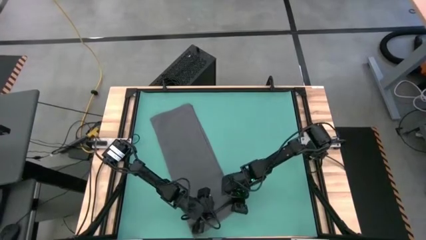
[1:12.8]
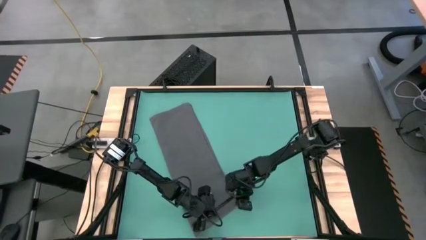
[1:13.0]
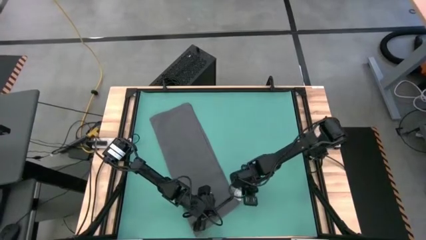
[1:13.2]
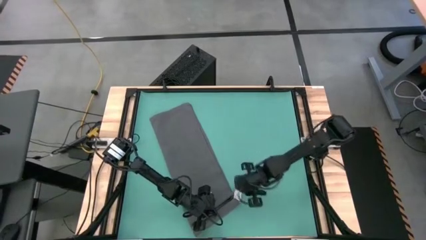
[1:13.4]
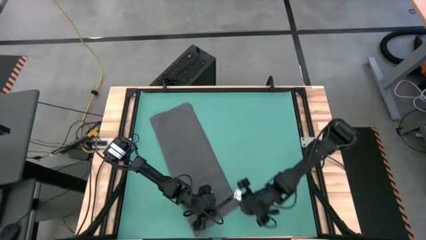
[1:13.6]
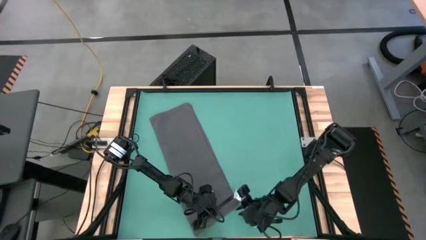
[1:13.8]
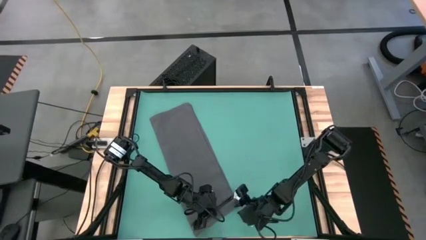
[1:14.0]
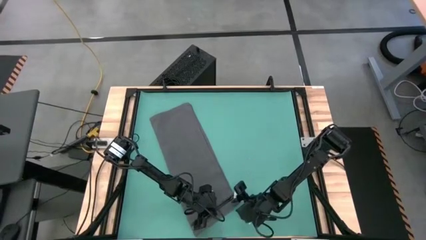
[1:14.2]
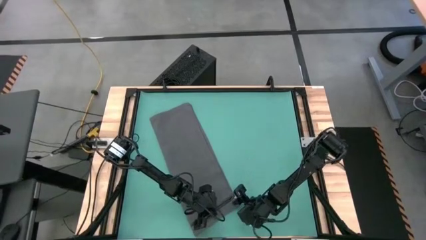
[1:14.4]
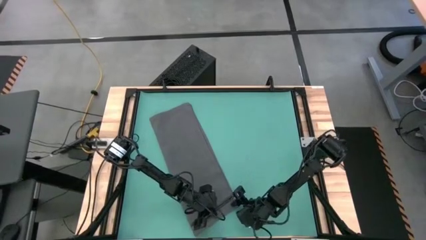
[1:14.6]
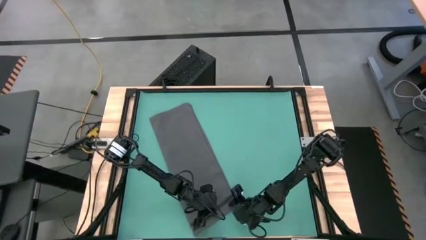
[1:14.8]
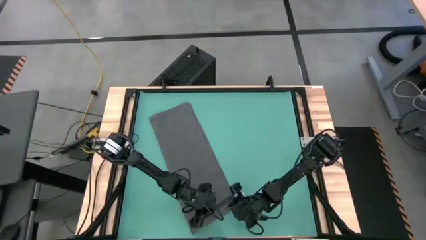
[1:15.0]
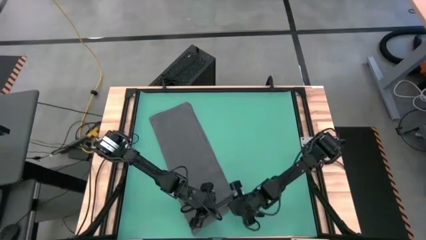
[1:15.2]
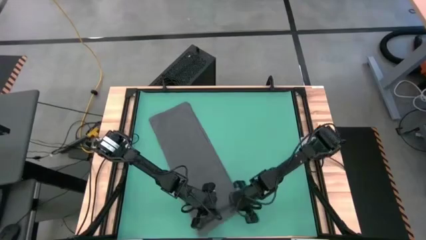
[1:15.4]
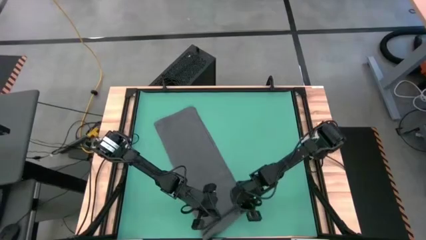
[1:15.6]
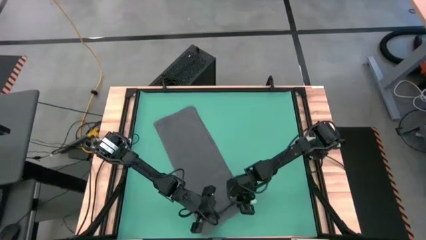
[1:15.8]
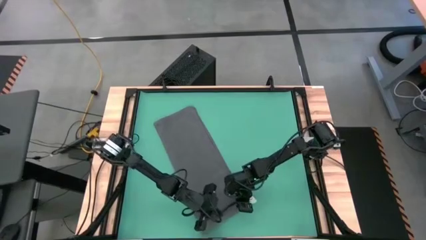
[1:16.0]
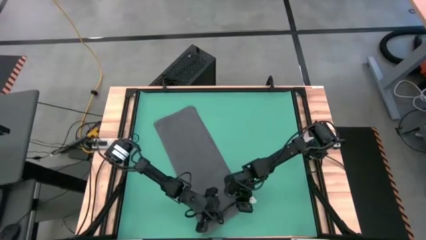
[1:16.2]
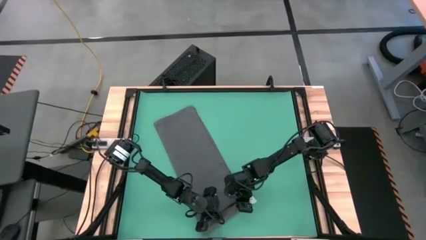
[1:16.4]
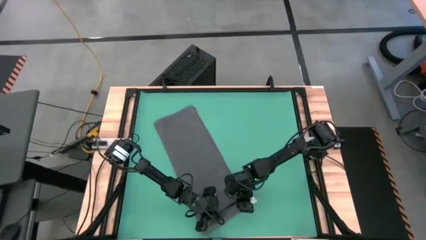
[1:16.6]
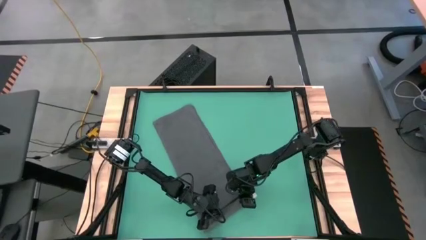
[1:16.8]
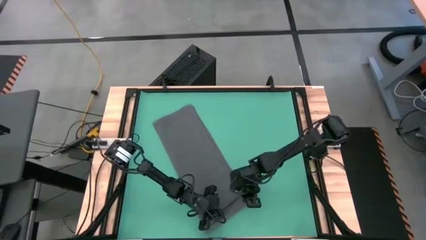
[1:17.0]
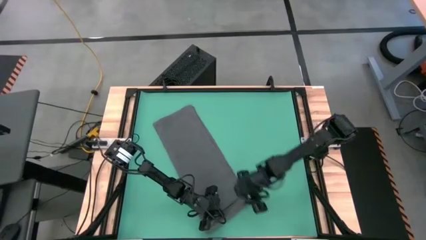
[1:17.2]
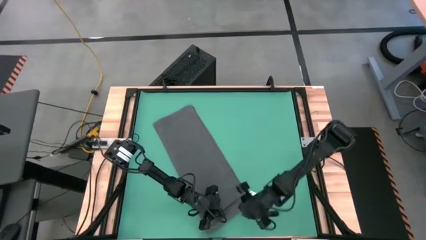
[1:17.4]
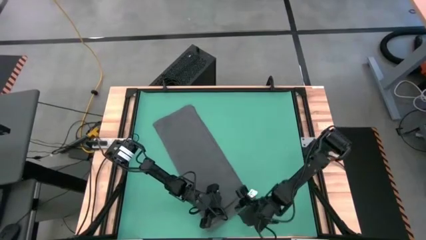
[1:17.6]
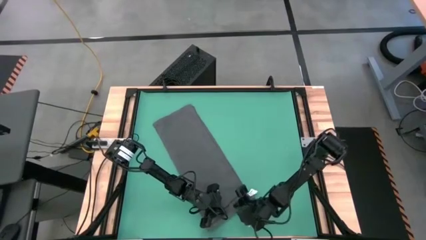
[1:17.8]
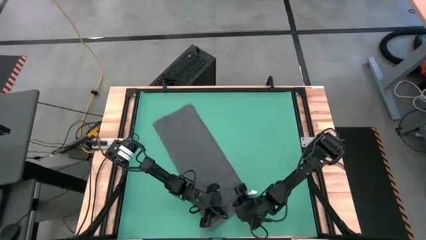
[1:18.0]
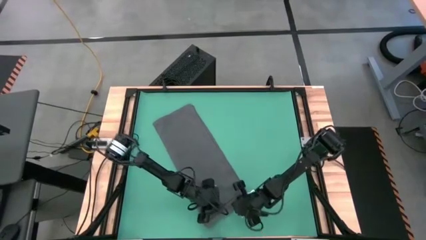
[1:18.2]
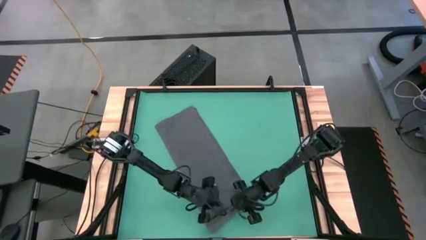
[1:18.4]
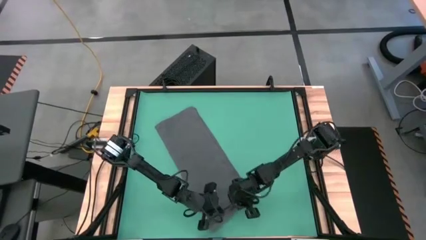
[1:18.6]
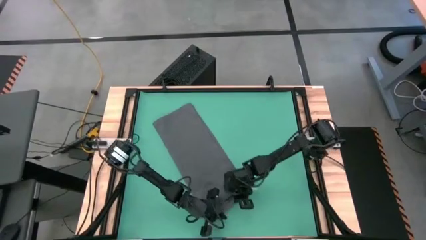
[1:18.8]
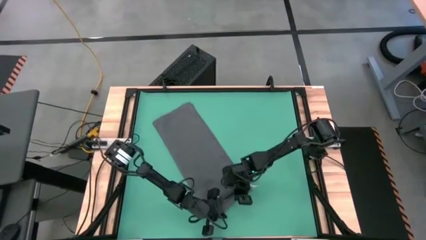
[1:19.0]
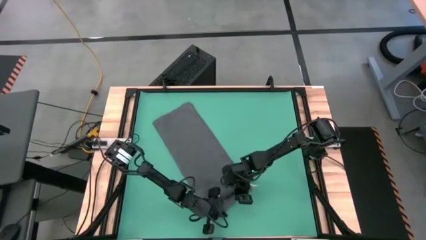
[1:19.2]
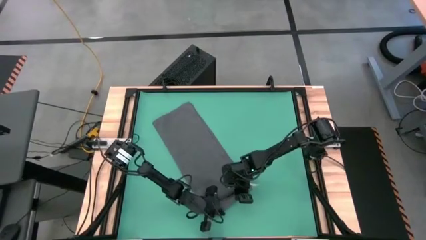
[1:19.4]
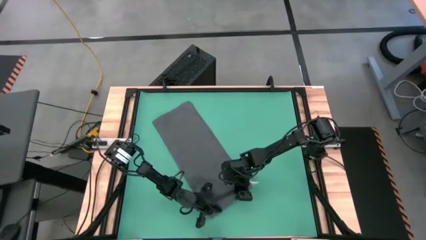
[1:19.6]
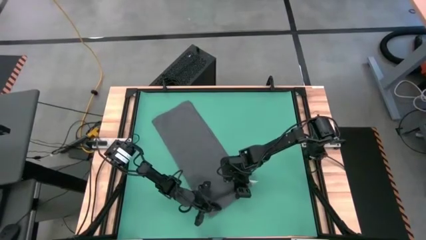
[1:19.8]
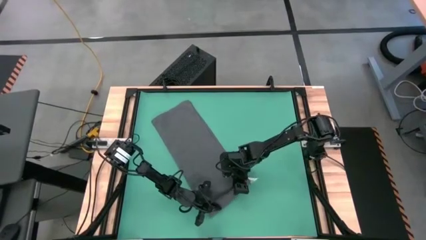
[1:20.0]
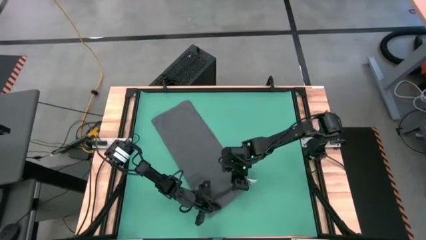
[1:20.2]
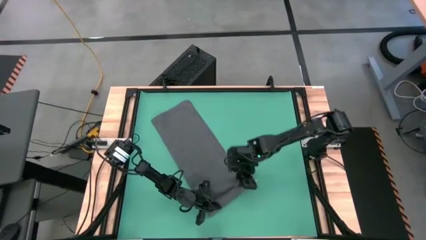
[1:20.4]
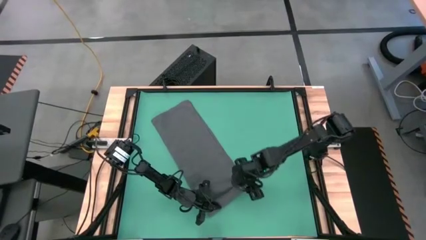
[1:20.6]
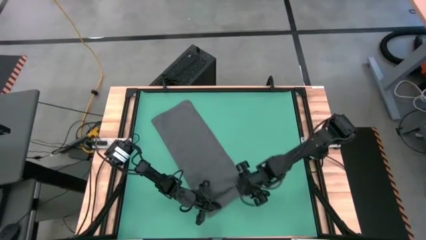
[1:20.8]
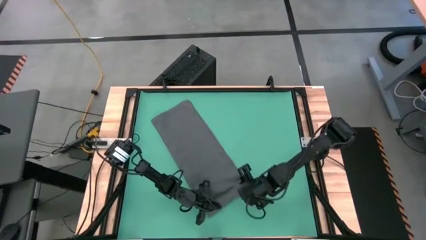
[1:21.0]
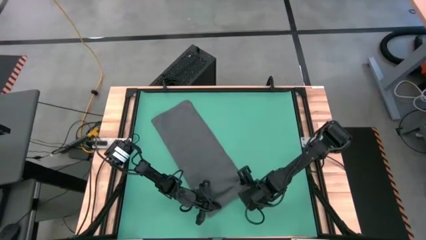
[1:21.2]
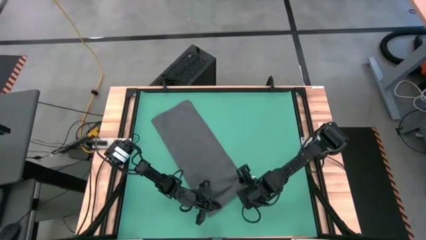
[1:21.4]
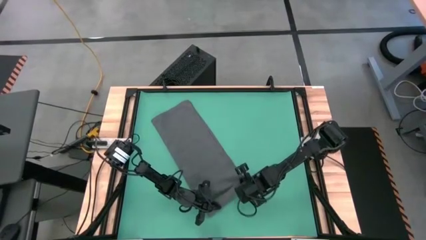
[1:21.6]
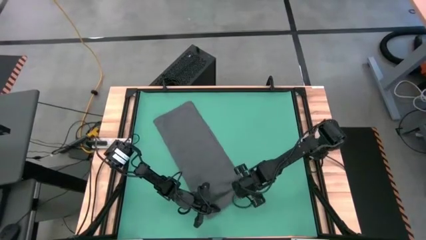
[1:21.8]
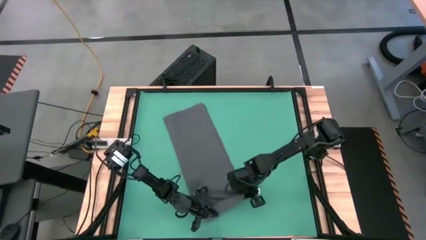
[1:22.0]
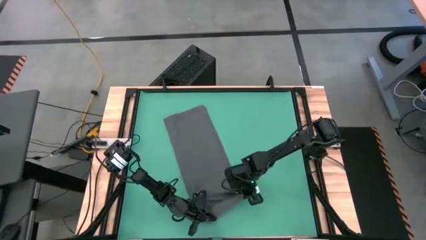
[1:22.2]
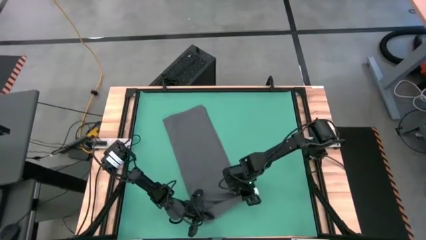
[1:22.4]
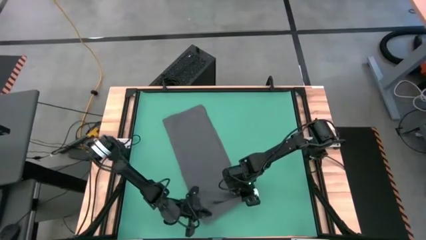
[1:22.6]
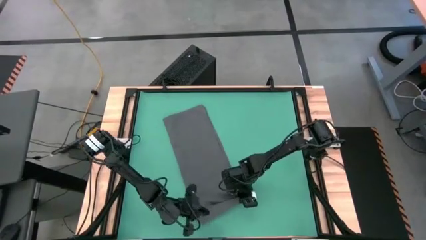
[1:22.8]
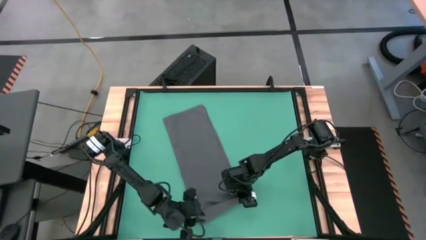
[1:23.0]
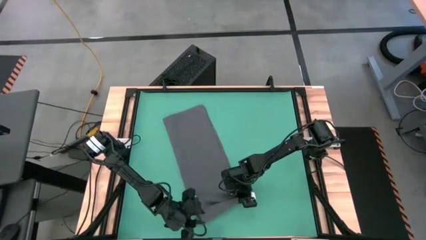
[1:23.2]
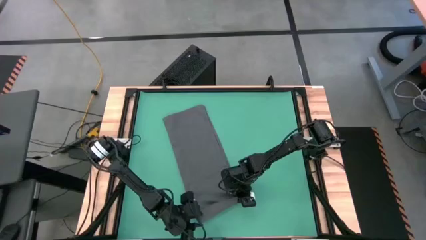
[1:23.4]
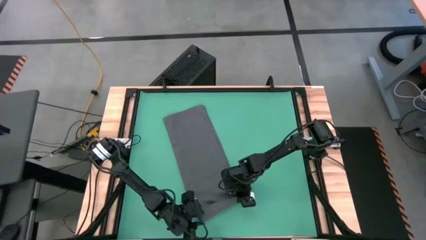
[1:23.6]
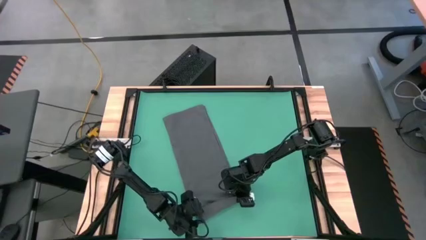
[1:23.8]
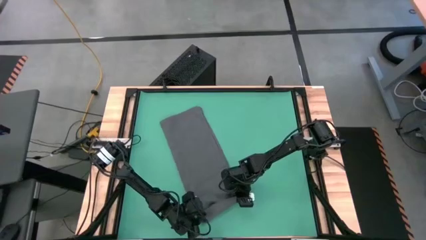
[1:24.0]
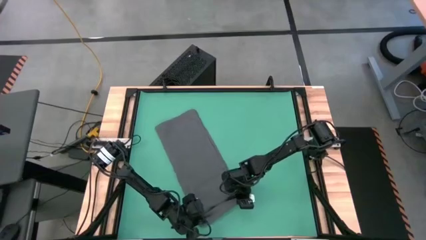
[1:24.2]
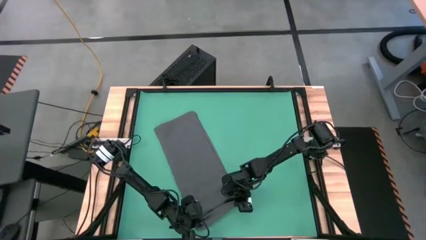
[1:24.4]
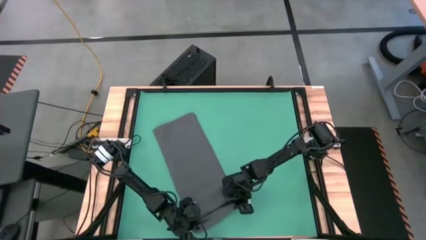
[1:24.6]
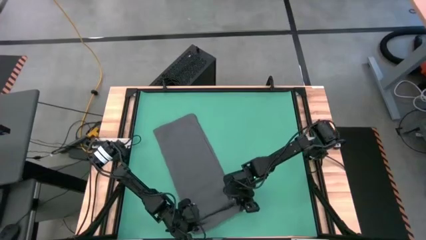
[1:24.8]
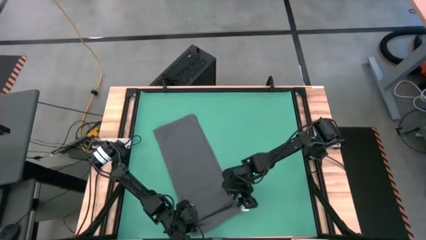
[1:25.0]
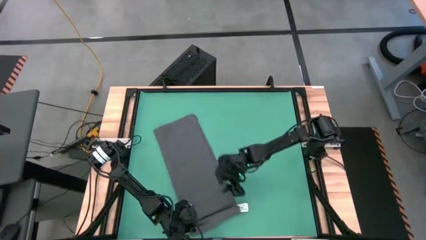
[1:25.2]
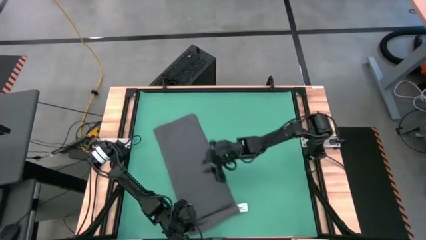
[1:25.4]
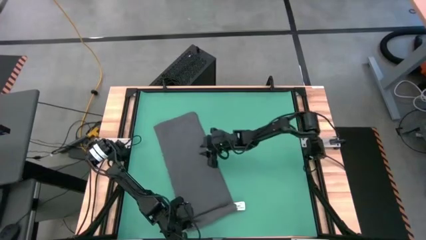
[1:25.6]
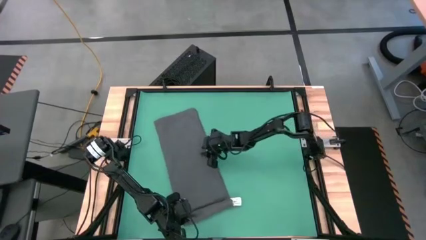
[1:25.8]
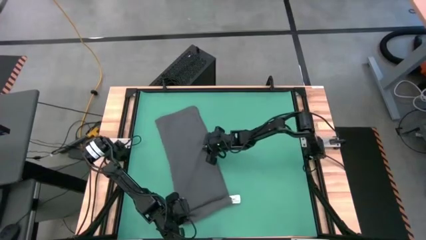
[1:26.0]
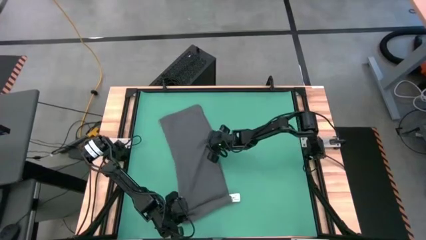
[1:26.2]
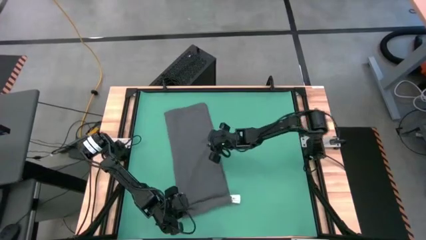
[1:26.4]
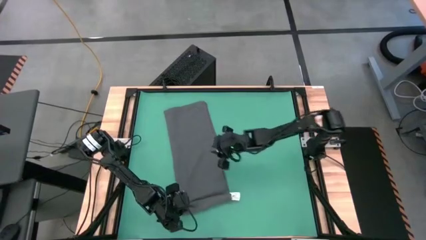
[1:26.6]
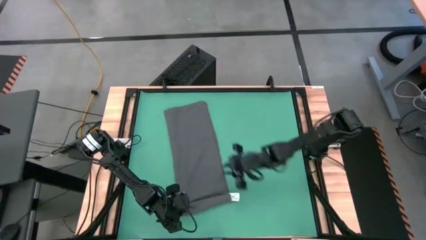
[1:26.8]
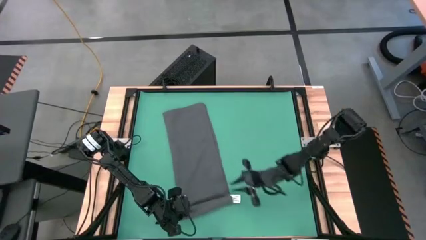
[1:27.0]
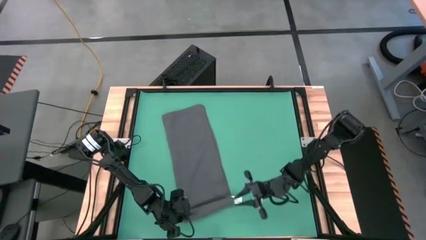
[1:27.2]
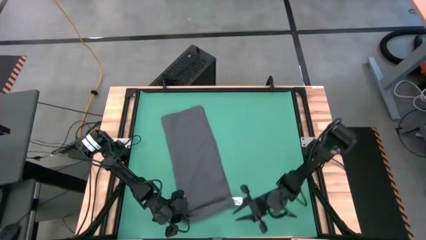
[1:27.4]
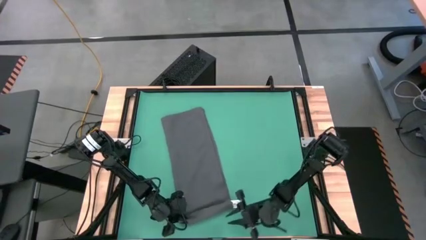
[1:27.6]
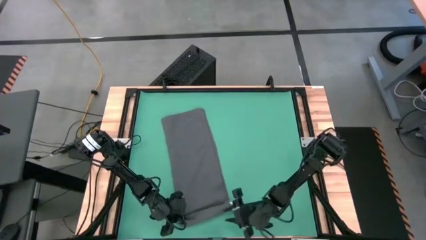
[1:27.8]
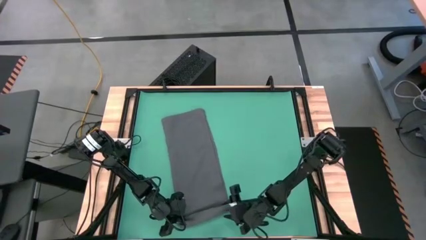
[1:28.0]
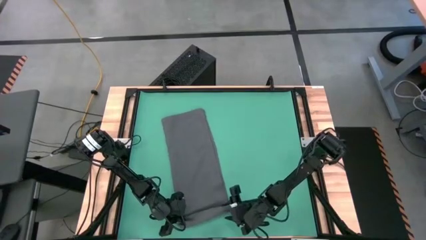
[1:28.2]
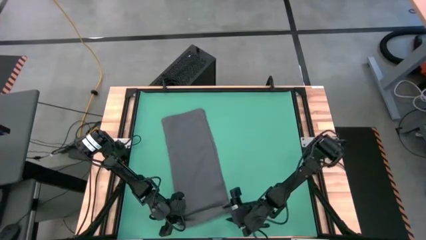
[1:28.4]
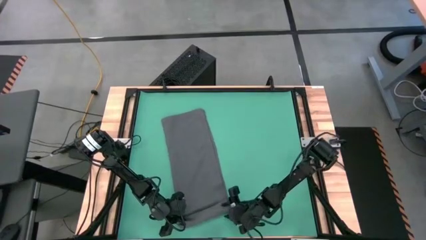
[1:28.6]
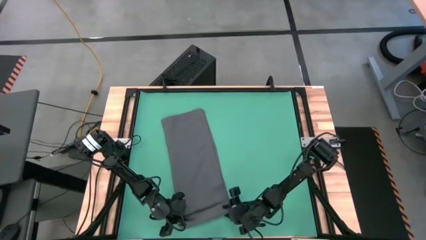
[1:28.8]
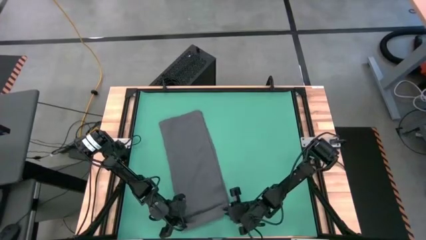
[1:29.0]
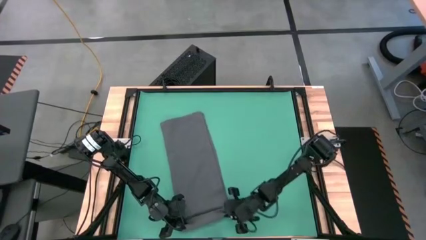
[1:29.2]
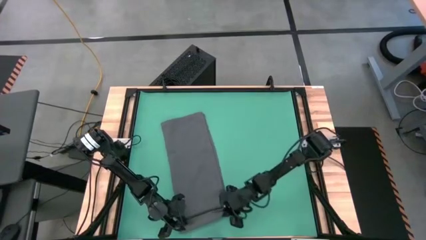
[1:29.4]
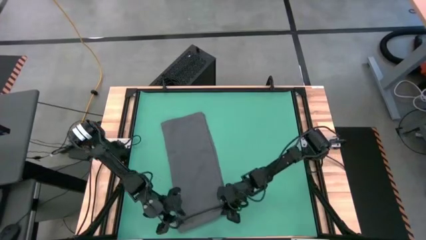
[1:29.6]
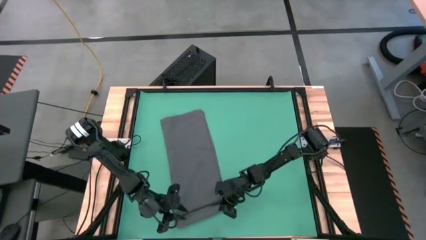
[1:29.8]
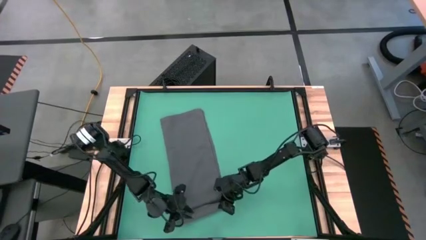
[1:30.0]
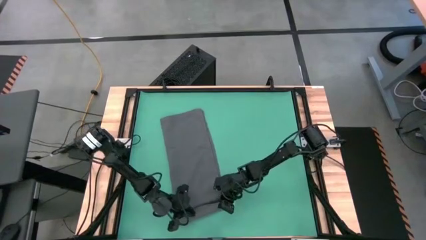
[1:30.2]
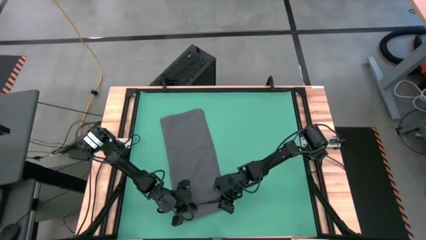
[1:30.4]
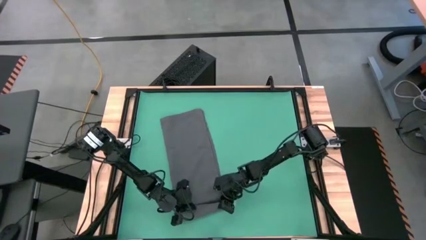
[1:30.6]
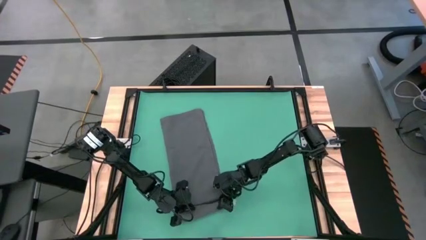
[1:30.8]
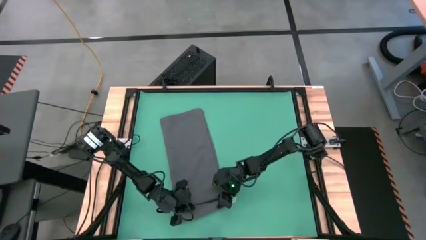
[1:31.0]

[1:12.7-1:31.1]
Task: Roll towel into tight, uniform cylinder
Roll the gray towel
